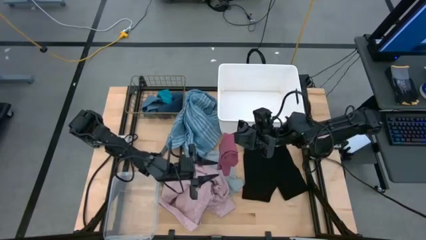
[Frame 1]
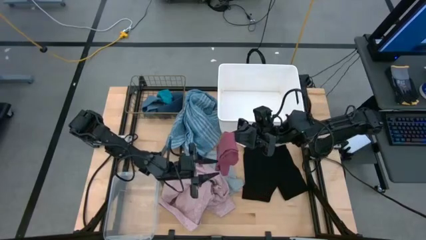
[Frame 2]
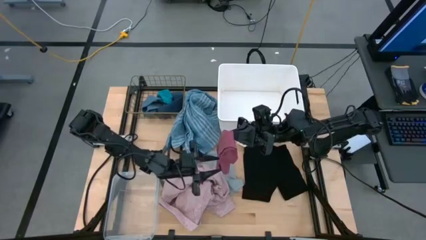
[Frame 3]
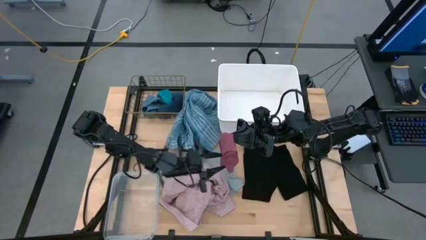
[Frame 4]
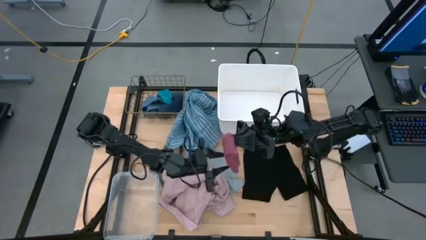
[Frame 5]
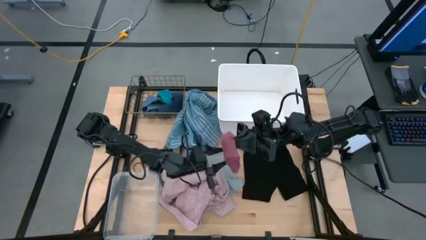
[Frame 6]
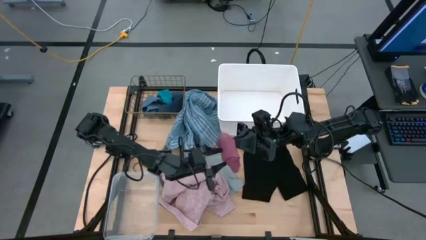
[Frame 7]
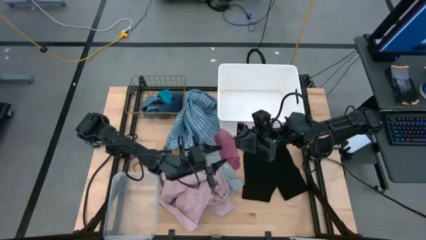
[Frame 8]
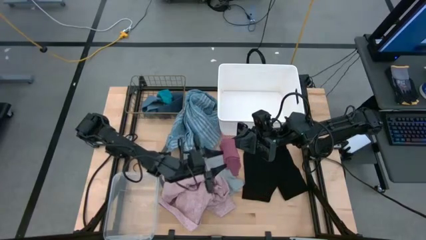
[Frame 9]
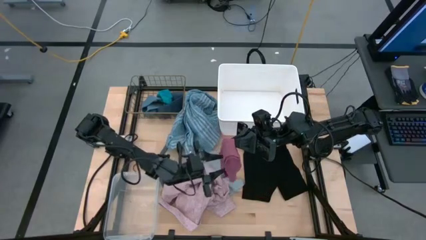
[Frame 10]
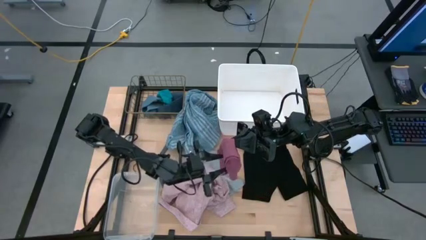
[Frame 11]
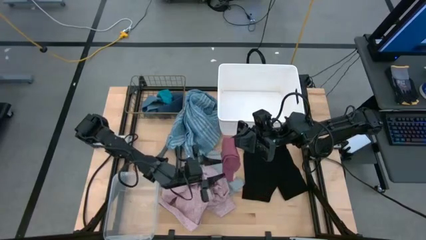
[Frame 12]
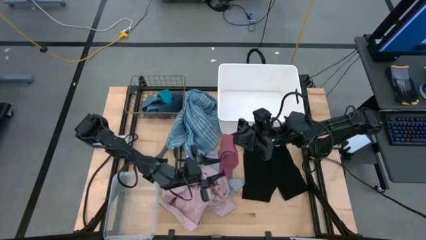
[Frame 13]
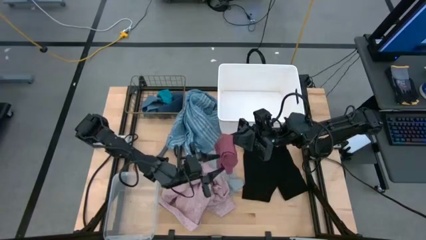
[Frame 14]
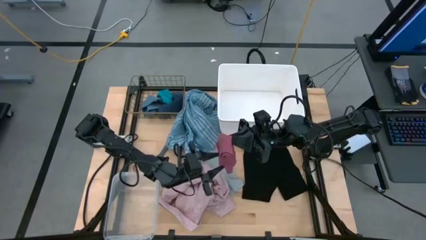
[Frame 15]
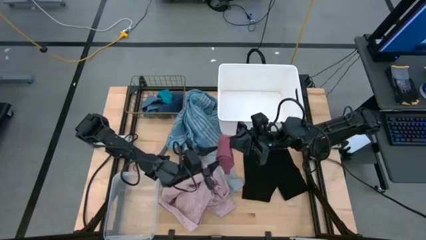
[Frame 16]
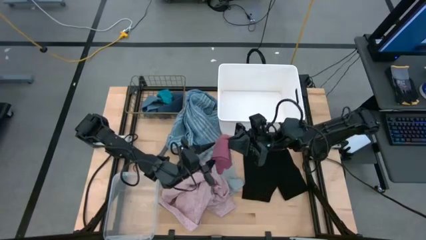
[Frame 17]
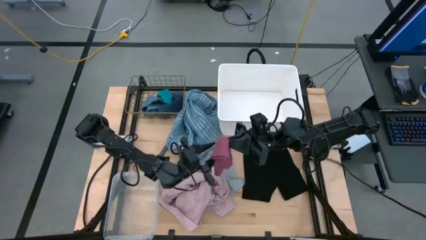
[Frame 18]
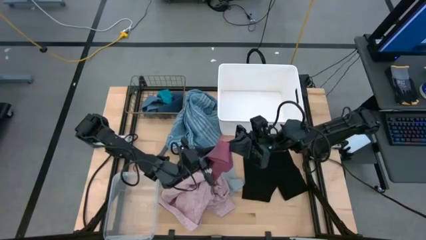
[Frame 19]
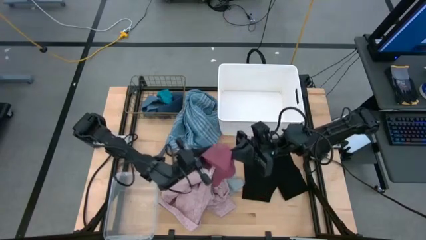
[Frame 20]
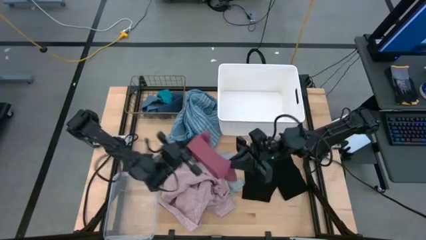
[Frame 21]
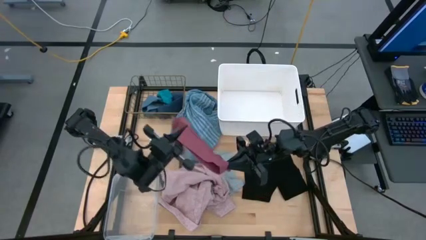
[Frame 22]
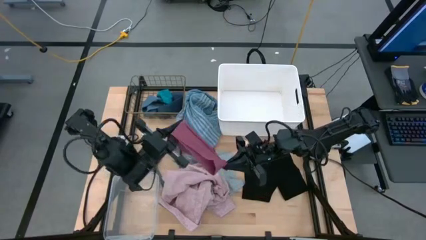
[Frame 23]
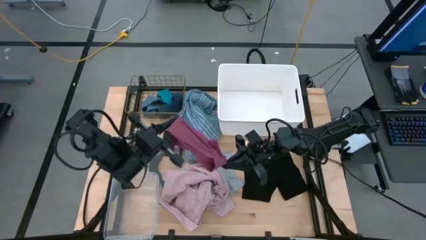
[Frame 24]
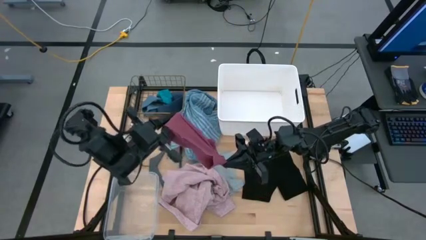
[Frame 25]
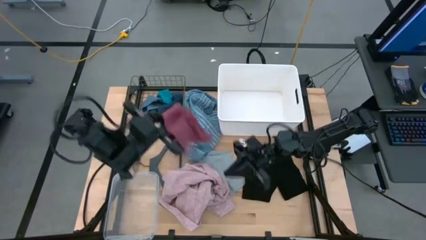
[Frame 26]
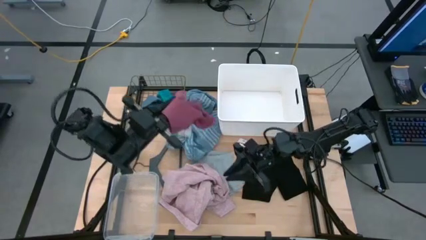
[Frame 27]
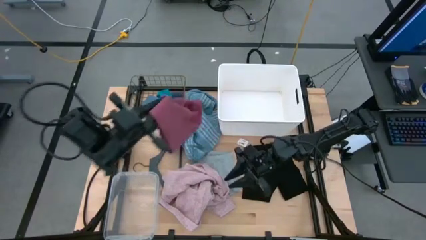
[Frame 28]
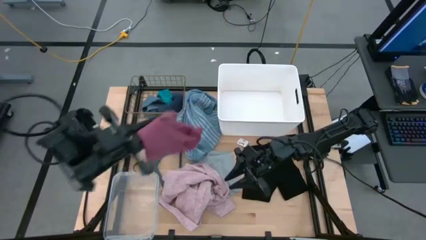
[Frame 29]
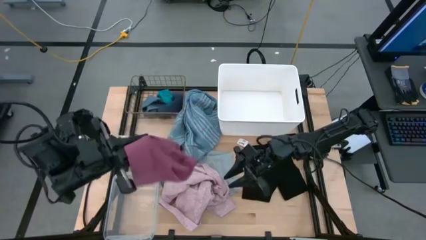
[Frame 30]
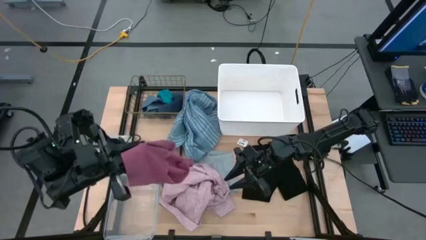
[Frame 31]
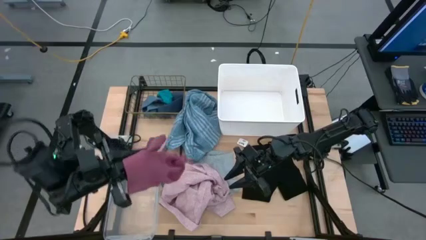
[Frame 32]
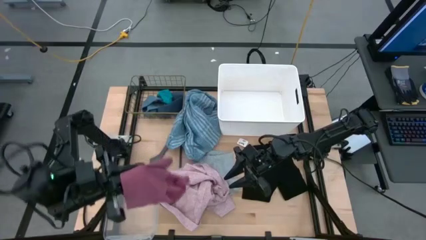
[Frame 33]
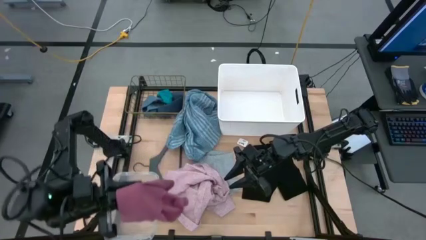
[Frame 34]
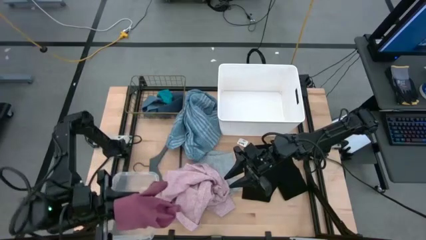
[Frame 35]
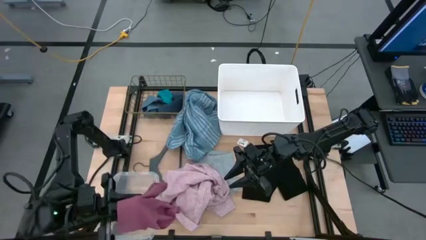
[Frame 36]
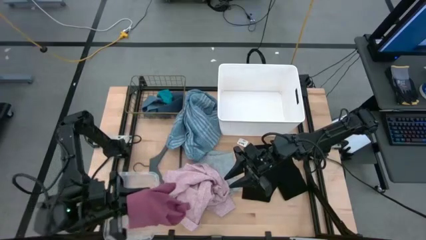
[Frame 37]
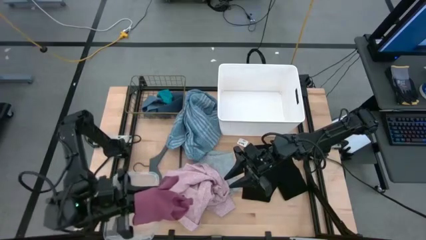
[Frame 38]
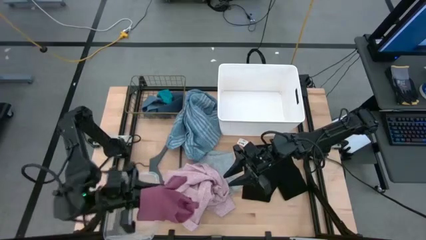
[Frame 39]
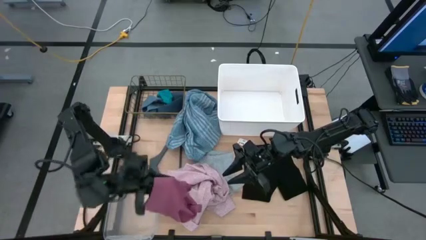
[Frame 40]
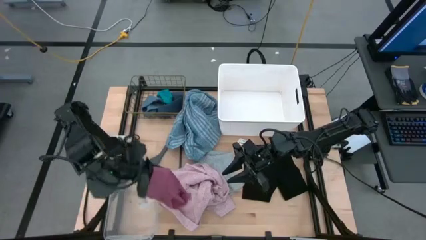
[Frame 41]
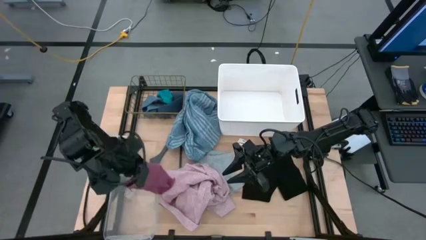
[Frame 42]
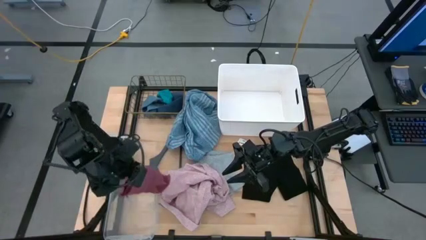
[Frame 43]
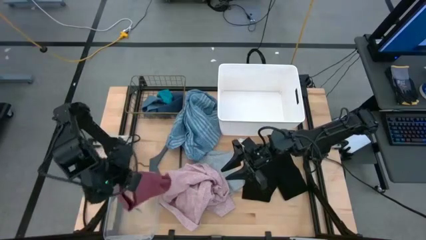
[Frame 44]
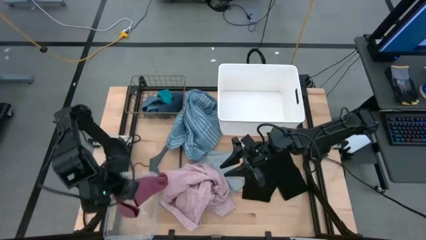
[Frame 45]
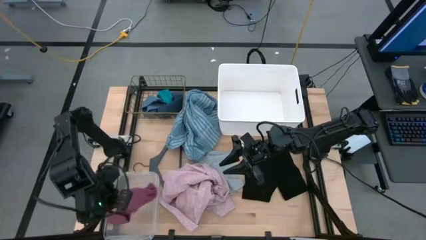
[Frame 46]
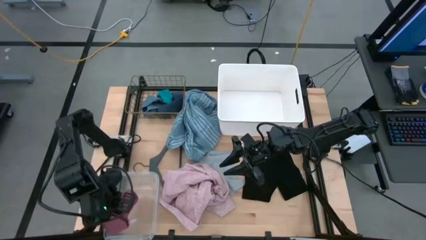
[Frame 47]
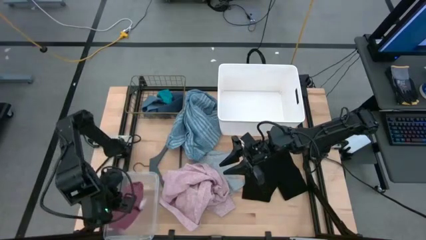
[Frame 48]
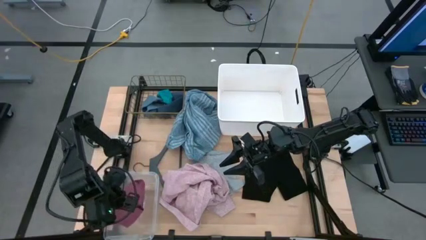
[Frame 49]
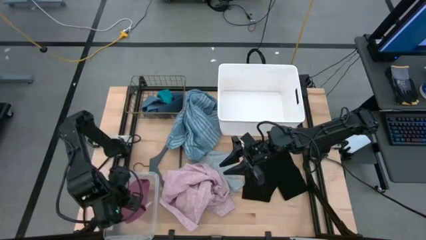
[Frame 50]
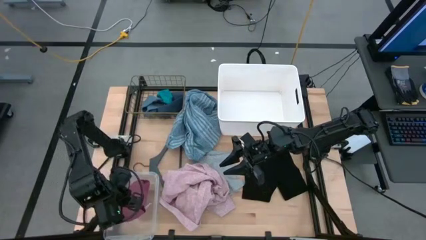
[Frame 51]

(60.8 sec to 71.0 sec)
Task: Pick & Place Cloths
Put the pink boxers into the transparent bin

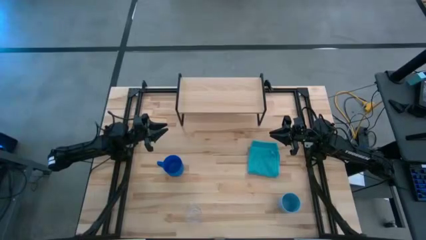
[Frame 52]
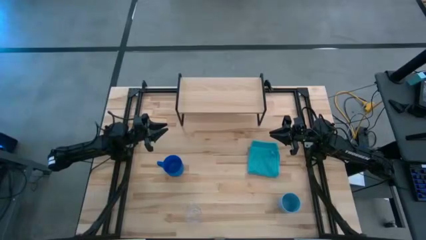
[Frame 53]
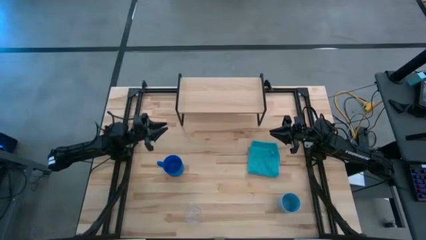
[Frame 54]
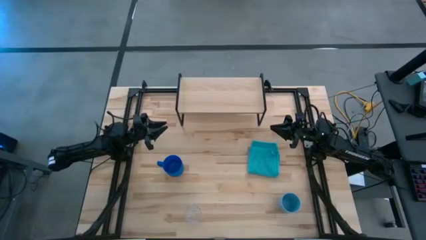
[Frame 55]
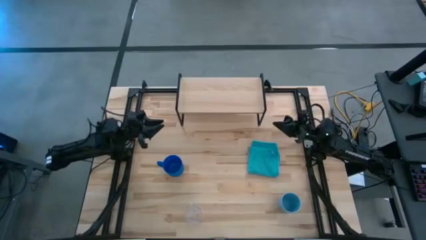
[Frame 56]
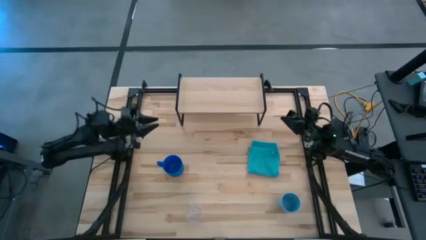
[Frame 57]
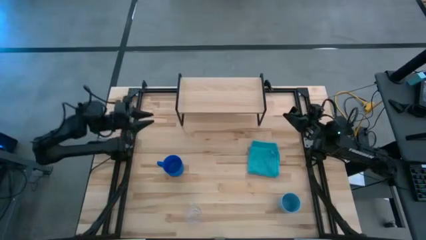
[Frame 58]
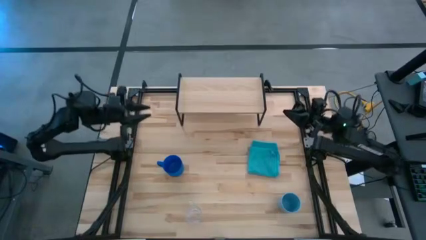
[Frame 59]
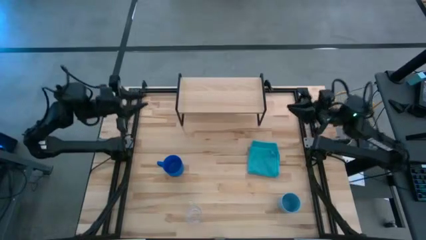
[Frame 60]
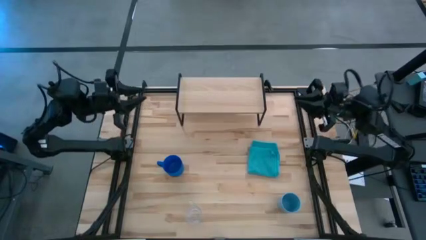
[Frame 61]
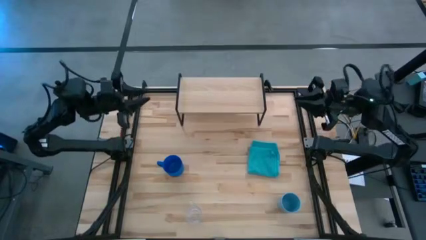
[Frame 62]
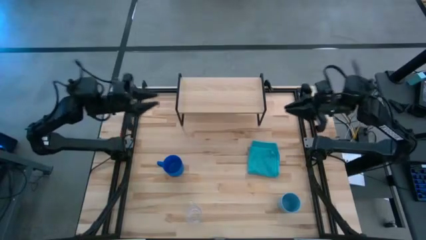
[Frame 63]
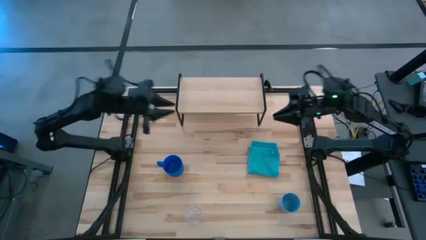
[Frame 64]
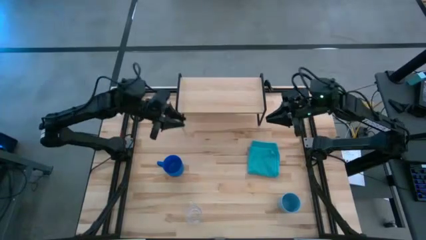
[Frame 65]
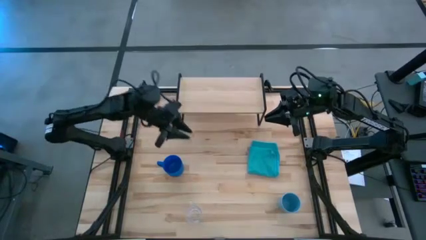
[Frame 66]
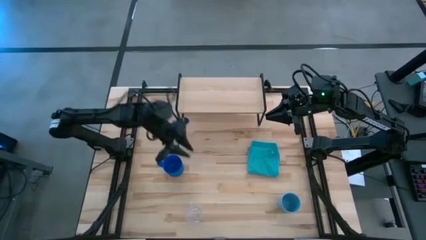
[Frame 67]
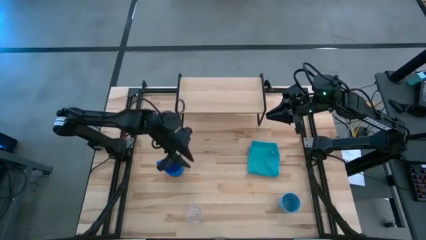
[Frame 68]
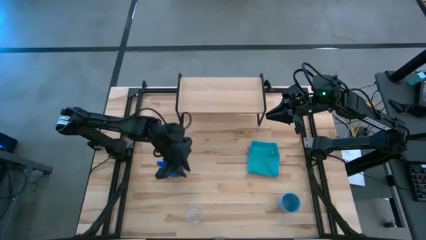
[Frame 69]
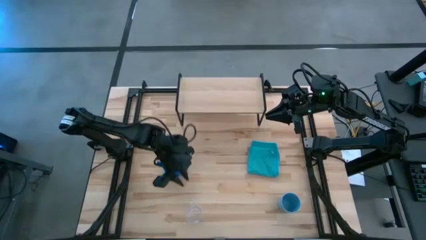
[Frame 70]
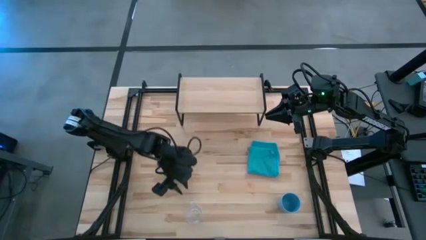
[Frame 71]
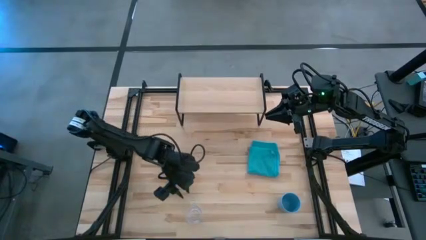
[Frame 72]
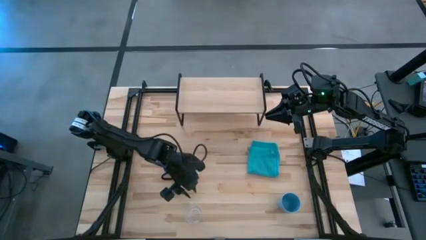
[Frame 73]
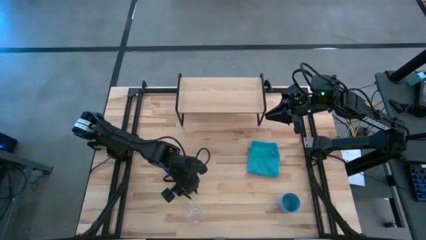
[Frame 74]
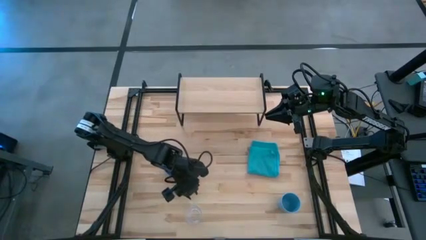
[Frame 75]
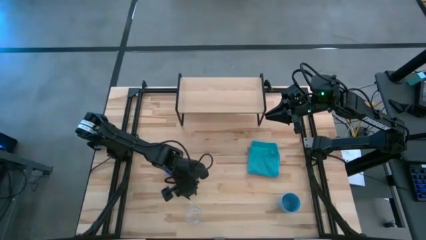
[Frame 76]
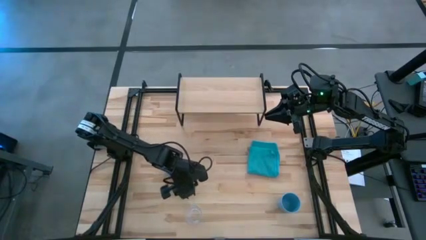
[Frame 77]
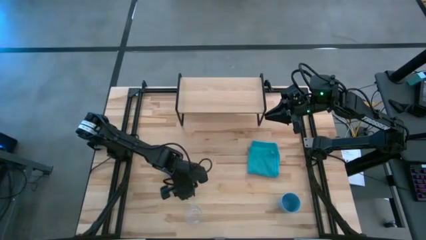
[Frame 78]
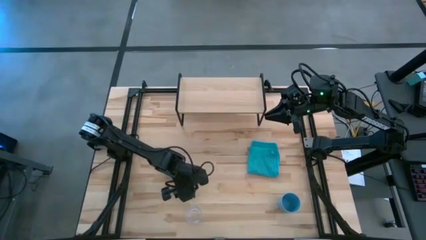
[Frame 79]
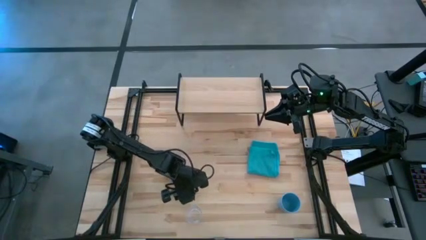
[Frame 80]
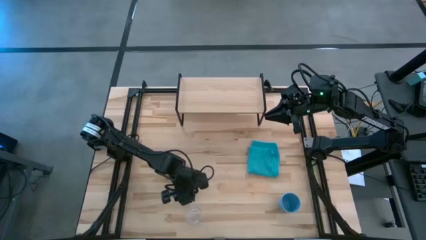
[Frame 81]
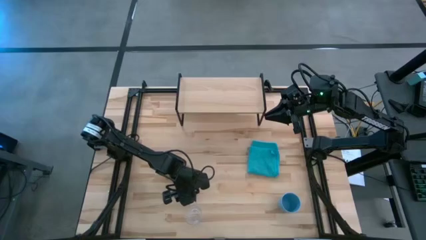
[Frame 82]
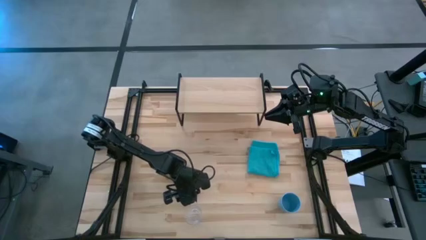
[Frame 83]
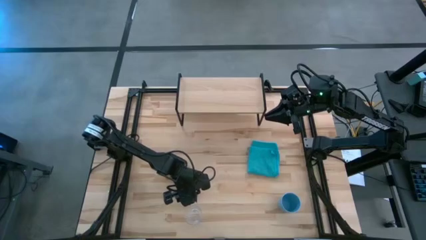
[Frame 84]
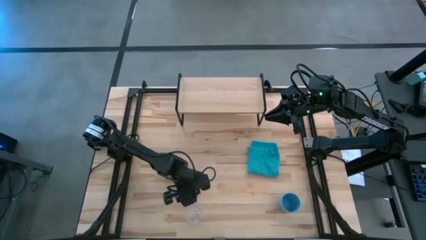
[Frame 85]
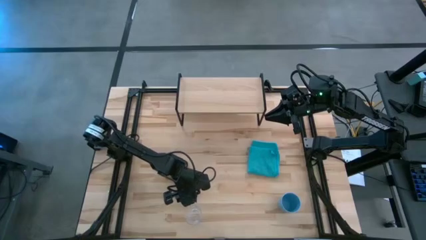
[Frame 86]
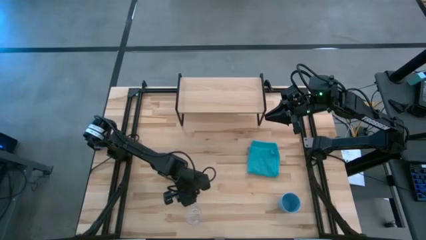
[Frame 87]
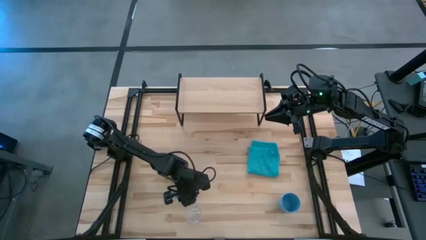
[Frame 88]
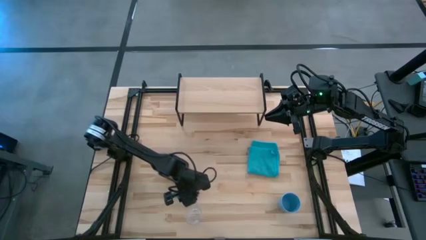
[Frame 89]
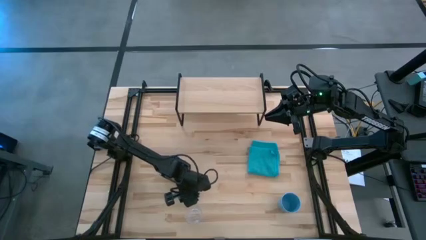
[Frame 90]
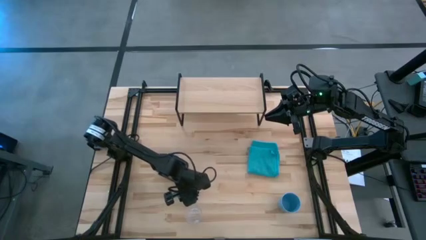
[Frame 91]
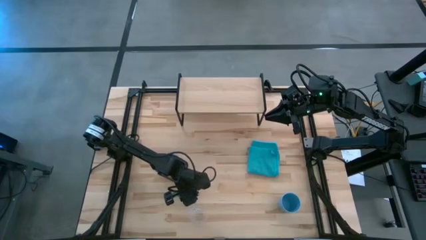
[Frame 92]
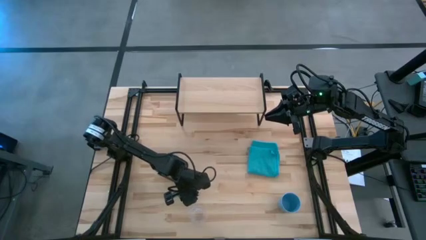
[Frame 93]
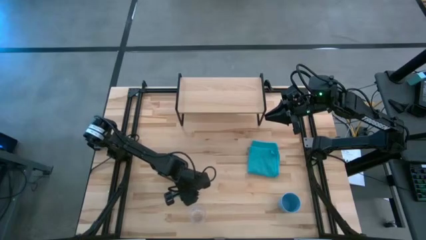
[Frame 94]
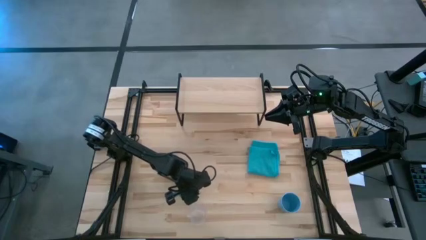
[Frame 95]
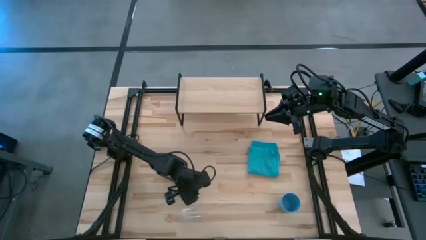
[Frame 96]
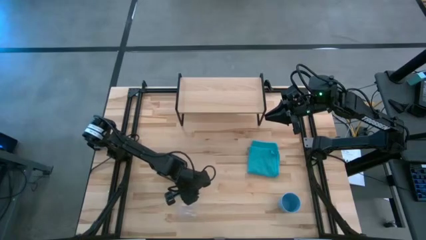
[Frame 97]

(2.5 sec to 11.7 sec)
Task: Stack small to large cups/mugs on shelf
Put the transparent mug on the shelf
